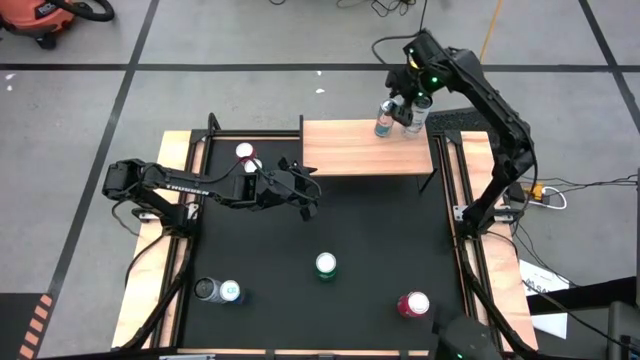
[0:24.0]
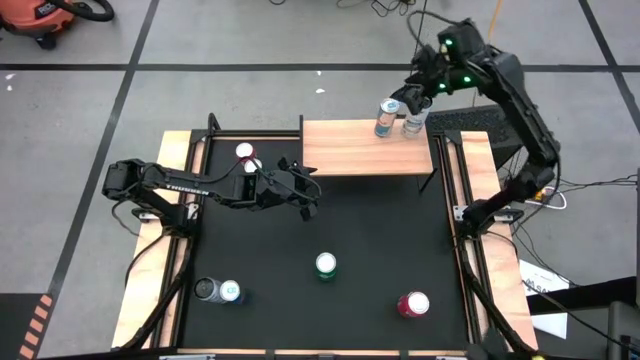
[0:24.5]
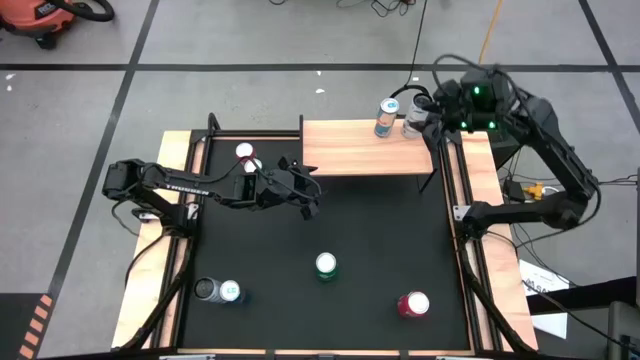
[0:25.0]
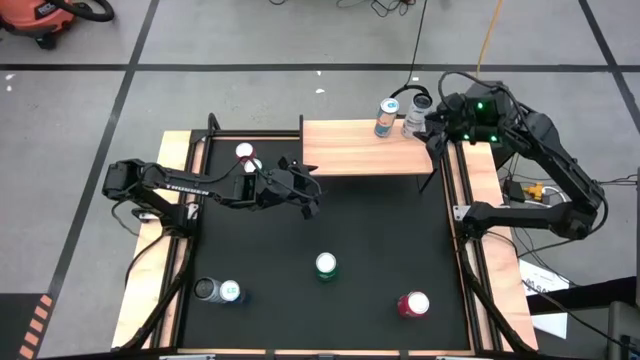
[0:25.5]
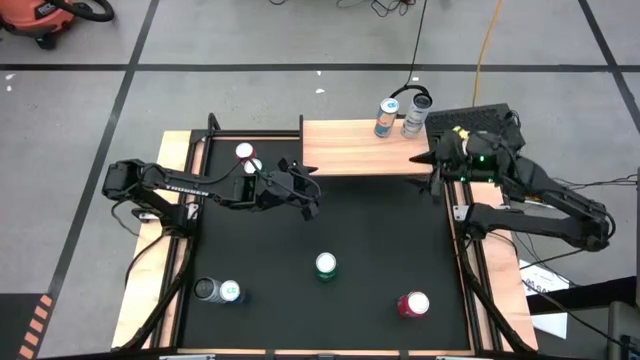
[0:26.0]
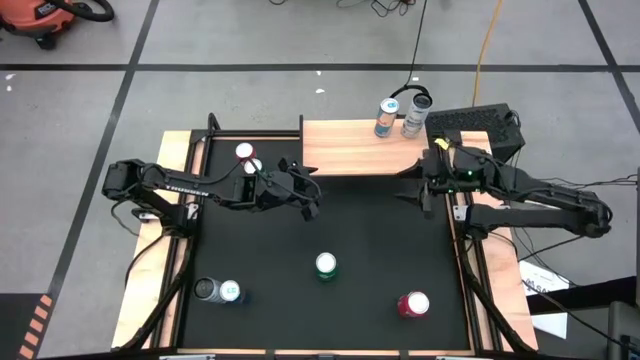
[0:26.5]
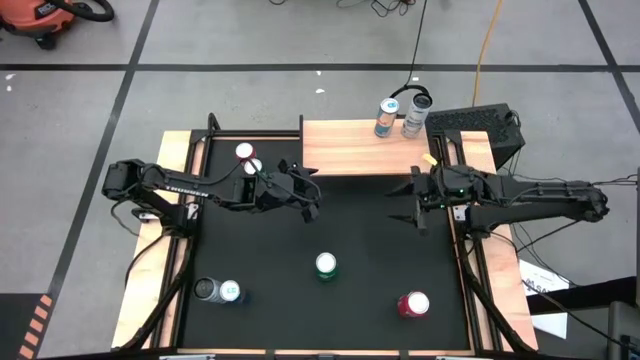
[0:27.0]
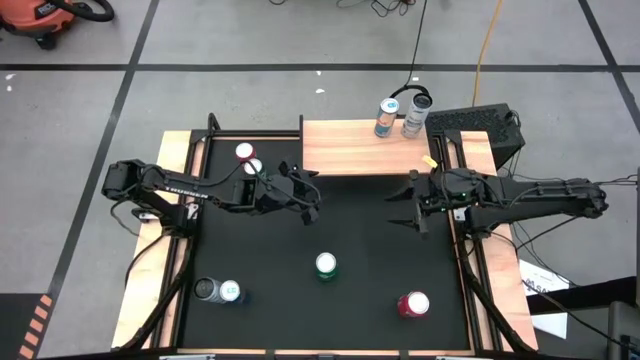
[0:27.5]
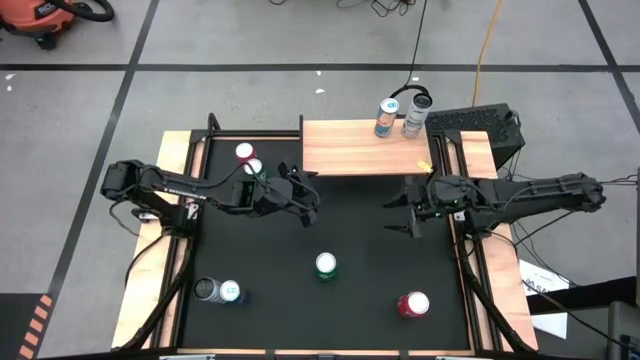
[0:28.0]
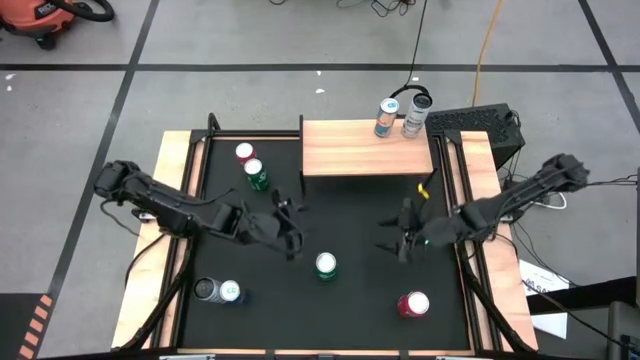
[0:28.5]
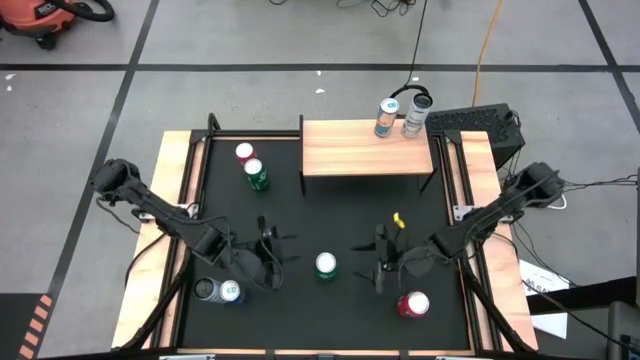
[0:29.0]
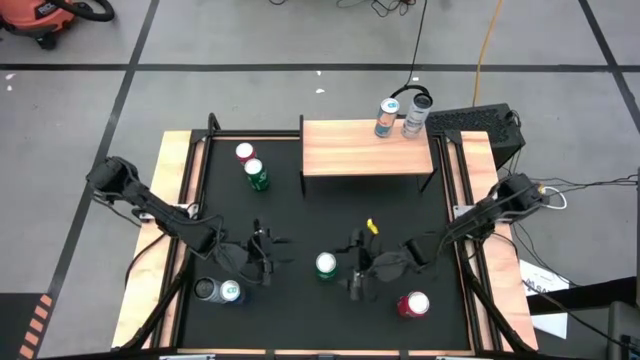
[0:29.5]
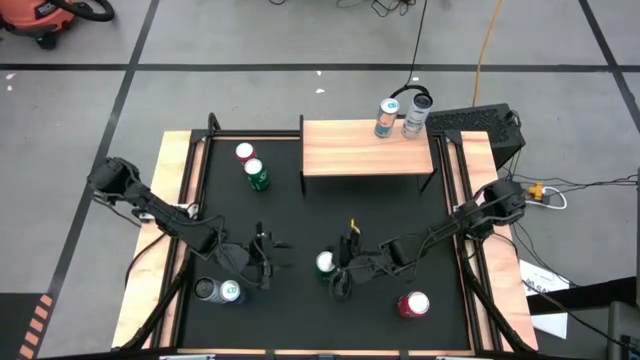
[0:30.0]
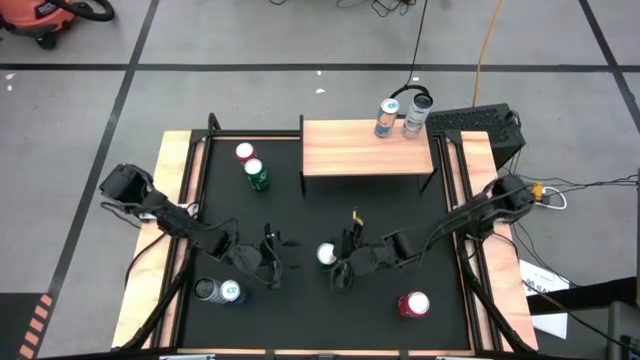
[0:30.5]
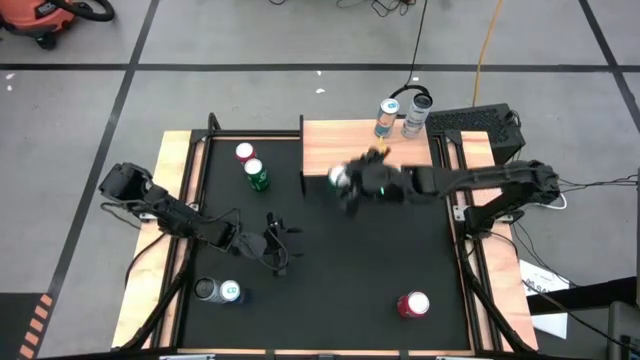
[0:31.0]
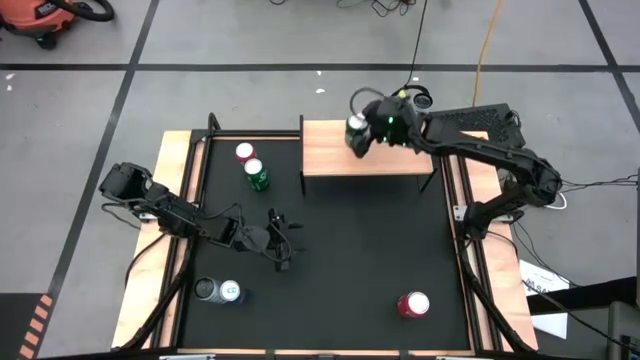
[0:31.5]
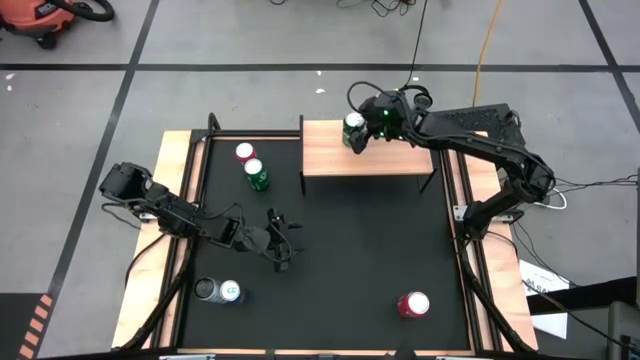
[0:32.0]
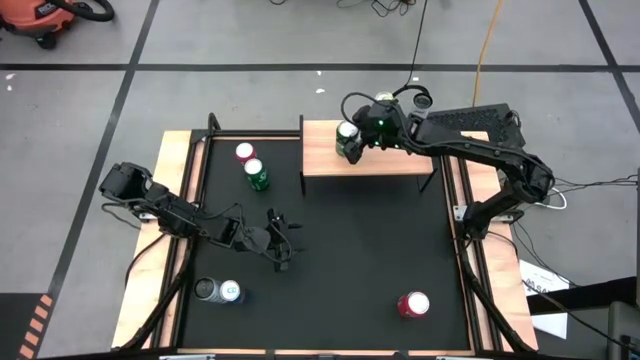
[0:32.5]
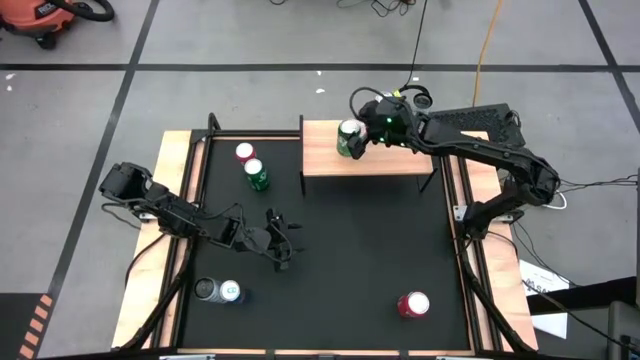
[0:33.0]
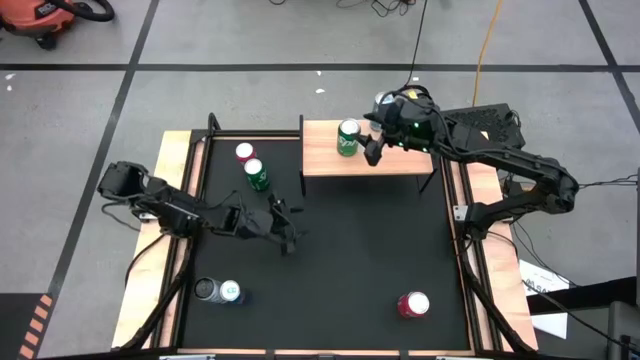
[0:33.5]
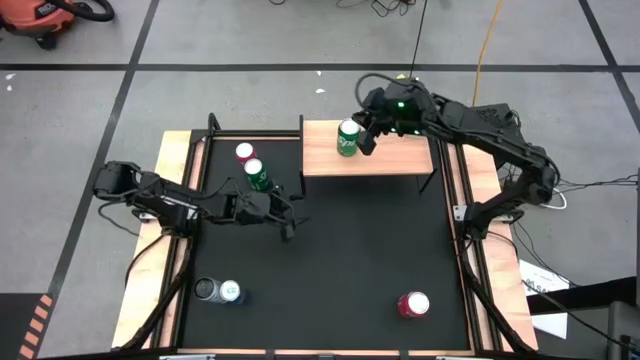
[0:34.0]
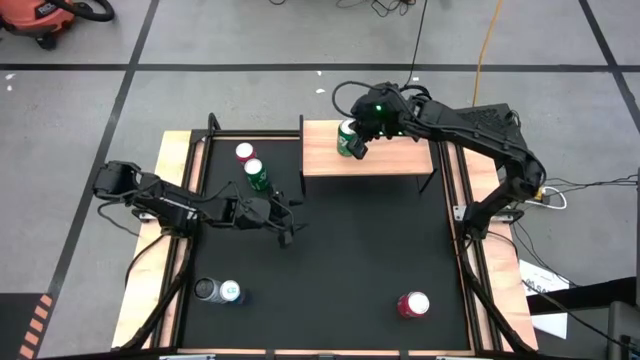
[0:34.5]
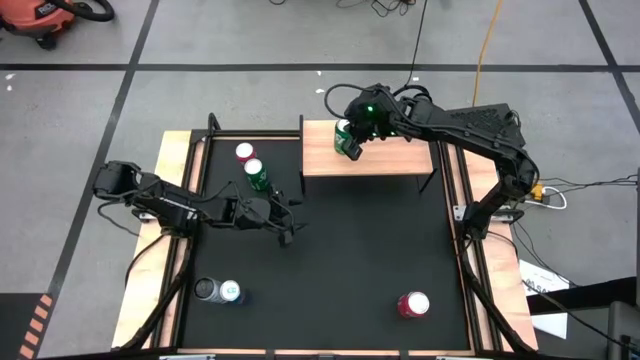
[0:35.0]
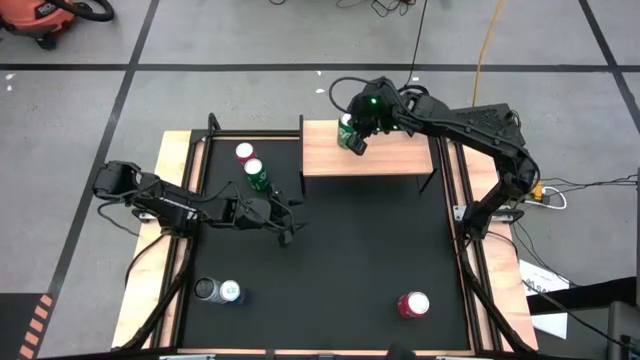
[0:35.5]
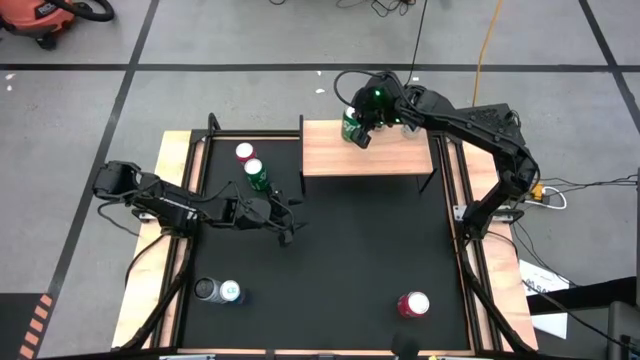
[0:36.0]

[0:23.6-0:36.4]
Task: Place canned beverage on shelf
Put the bottom green soda can on the shelf

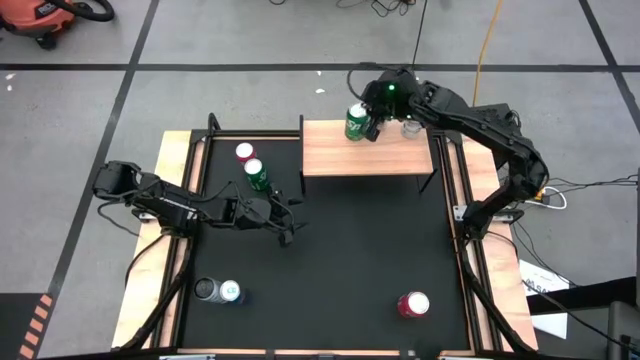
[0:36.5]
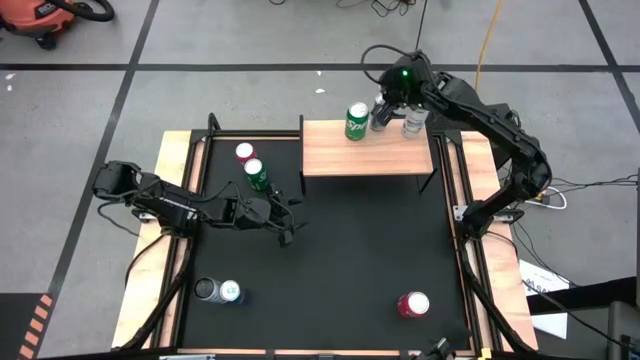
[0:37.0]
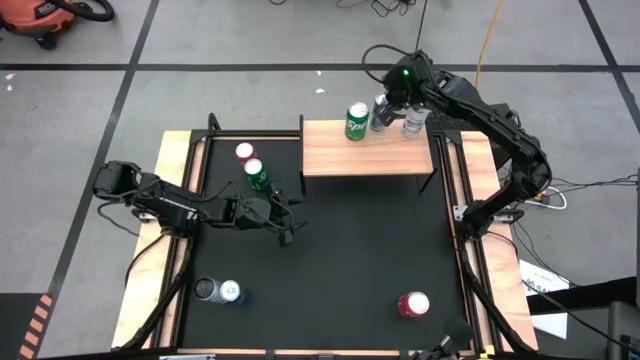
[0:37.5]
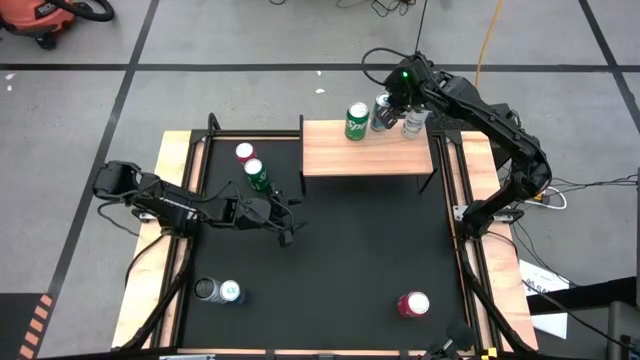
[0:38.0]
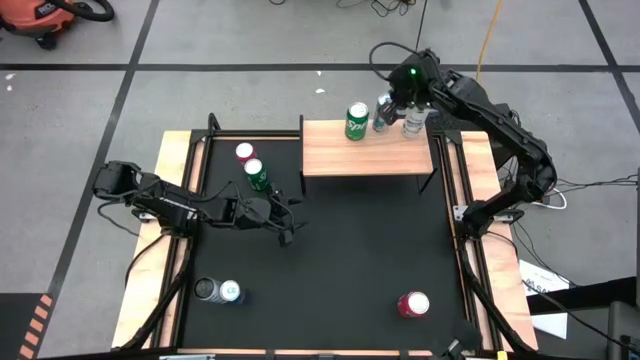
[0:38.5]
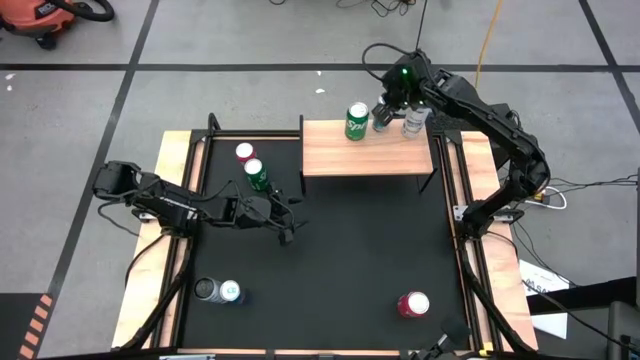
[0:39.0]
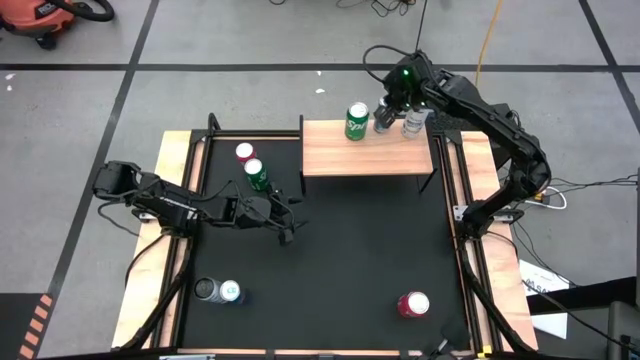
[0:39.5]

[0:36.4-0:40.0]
Adjust the blue soda can on the shelf

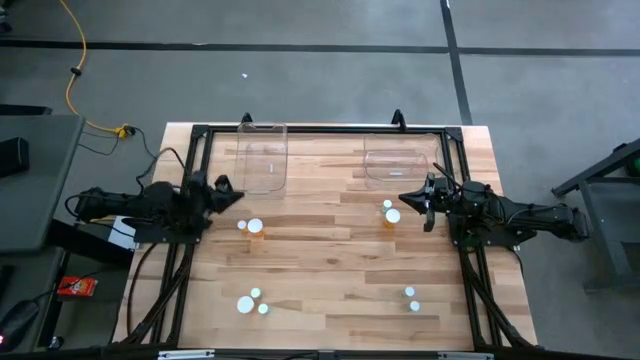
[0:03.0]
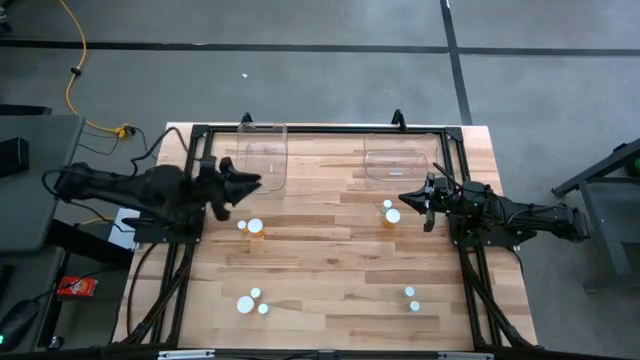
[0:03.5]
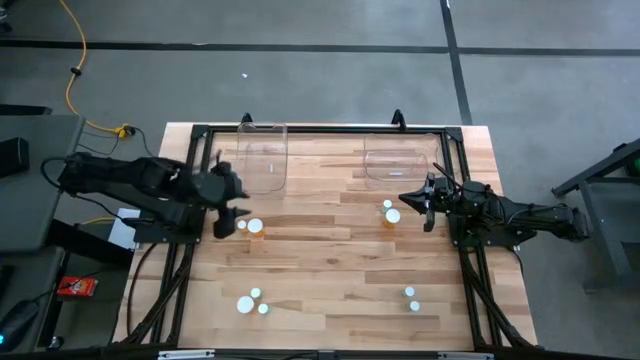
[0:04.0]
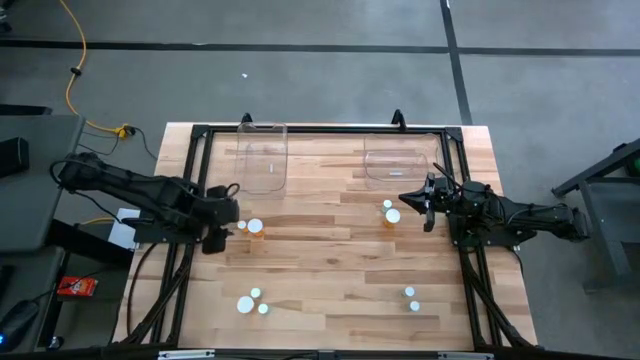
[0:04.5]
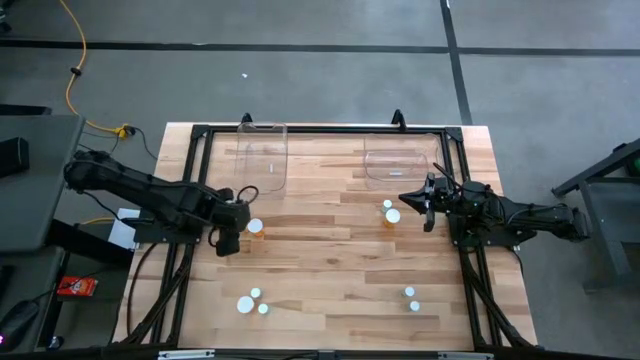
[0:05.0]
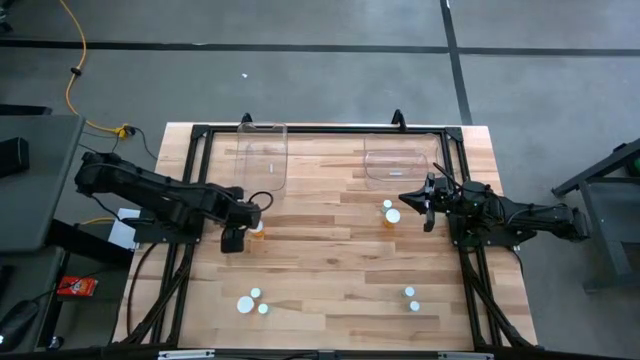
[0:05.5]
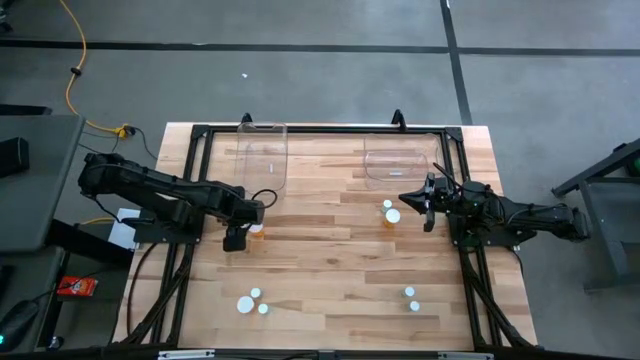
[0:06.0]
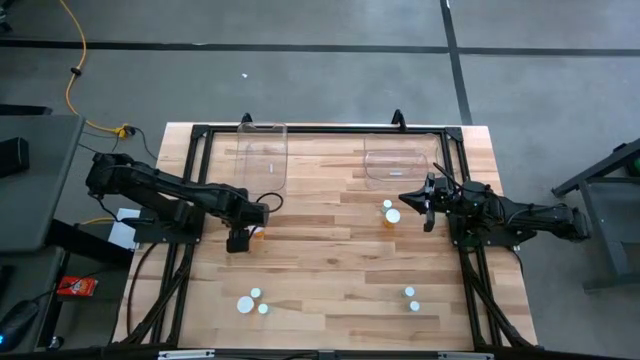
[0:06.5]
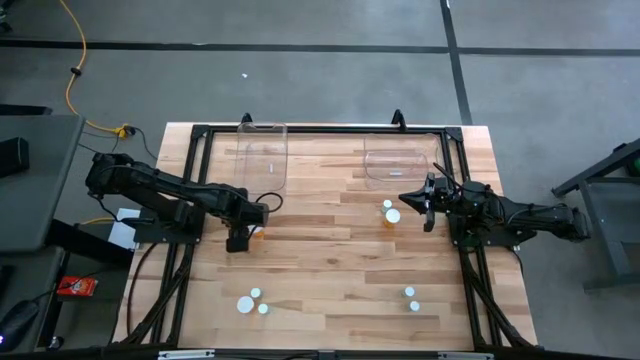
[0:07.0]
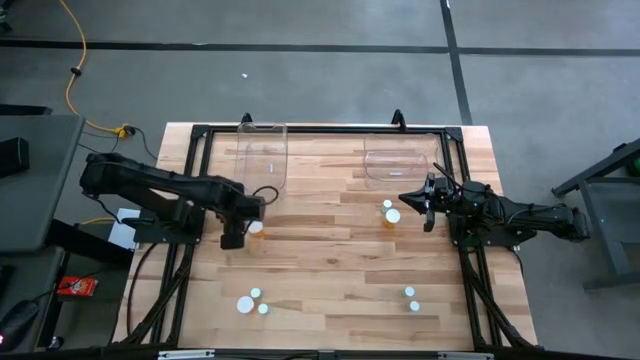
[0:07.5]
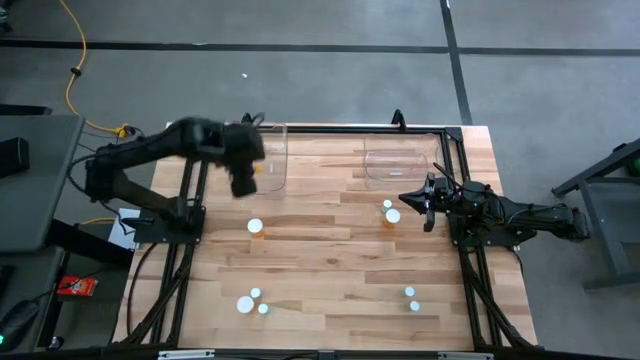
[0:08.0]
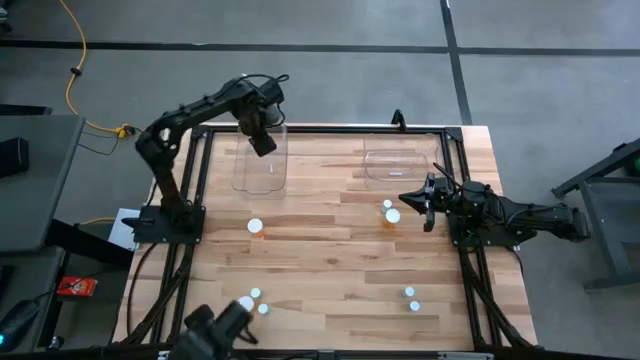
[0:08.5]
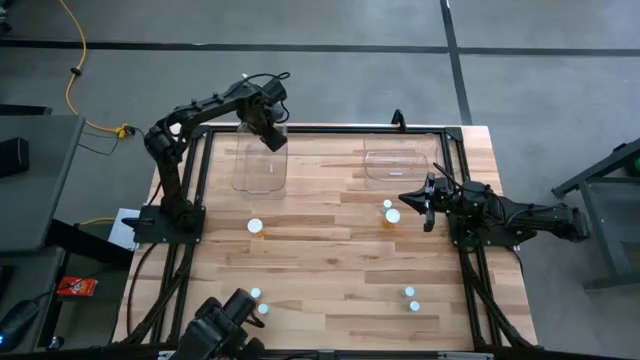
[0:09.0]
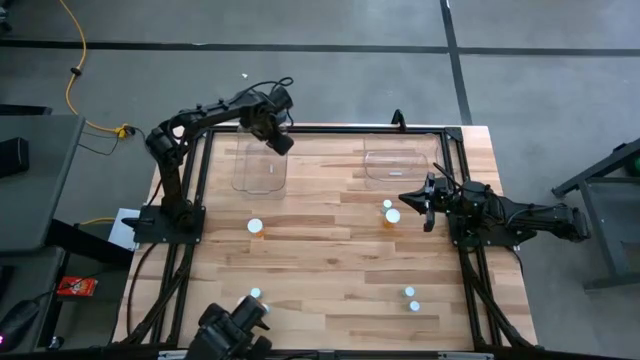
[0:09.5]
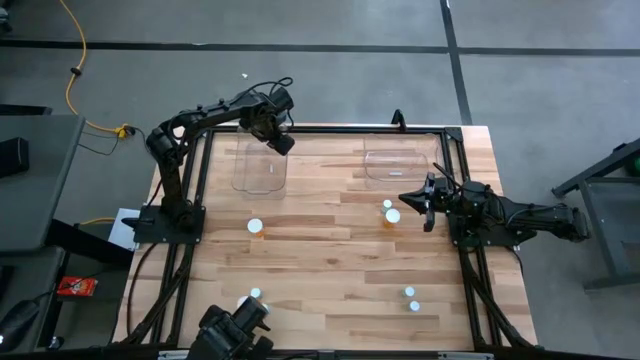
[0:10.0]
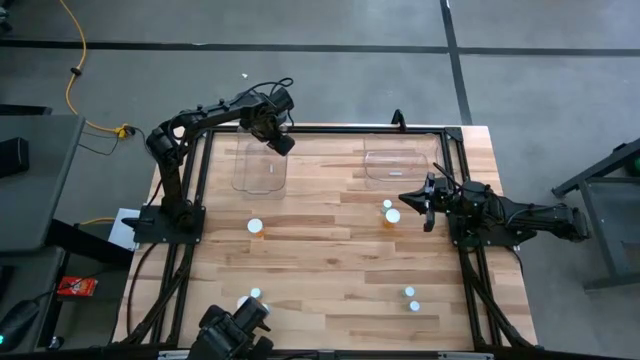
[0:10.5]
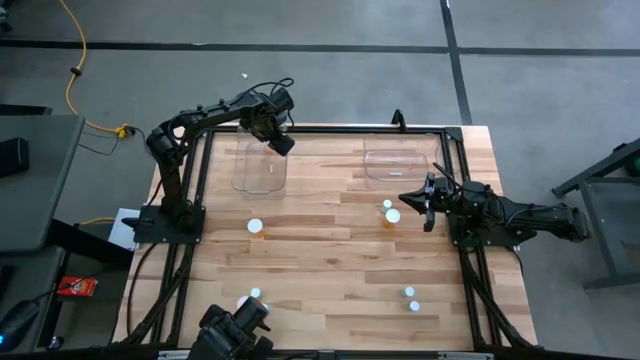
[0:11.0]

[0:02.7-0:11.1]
Task: Pick and place medicine bottles into bin by pill shape (circle, oval)
Put the small orange pill bottle into the left transparent bin
